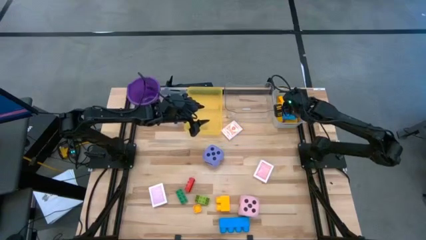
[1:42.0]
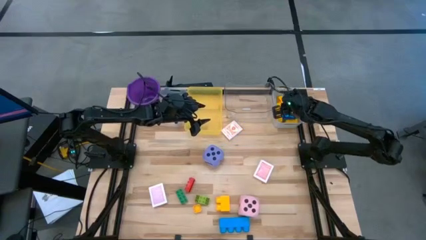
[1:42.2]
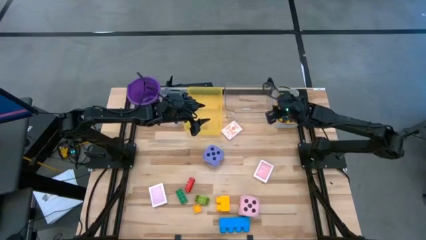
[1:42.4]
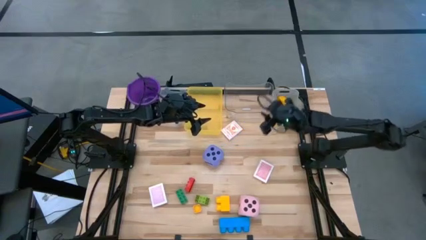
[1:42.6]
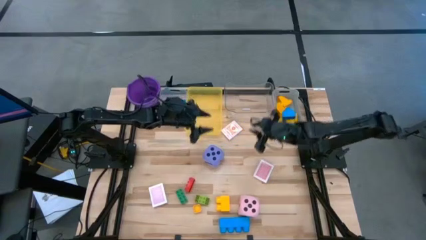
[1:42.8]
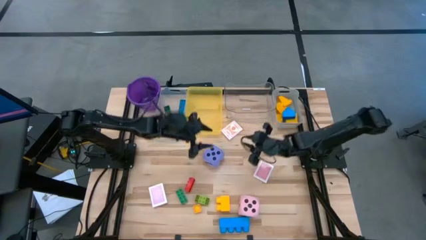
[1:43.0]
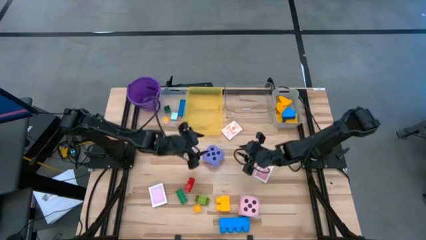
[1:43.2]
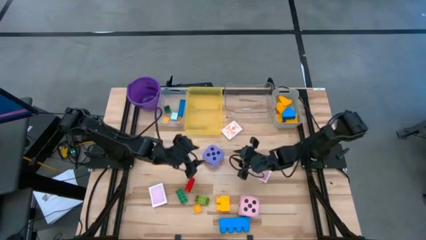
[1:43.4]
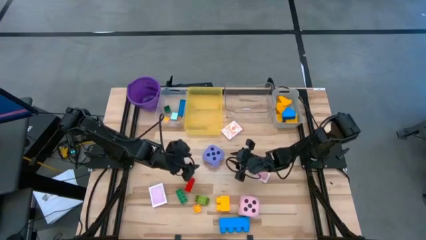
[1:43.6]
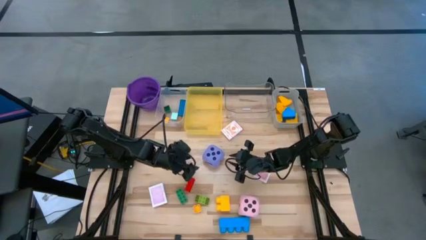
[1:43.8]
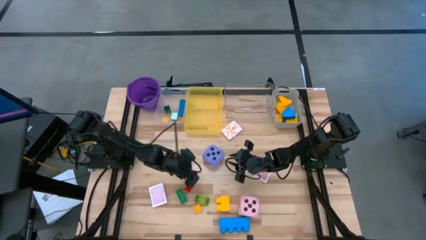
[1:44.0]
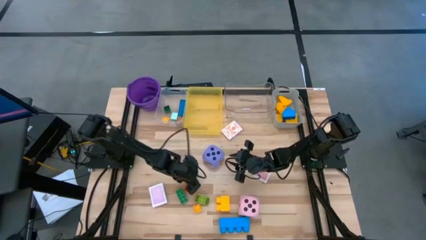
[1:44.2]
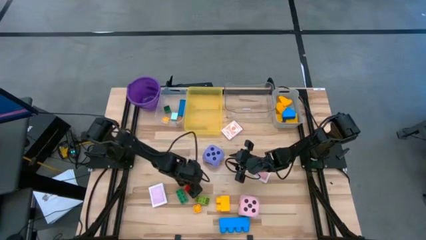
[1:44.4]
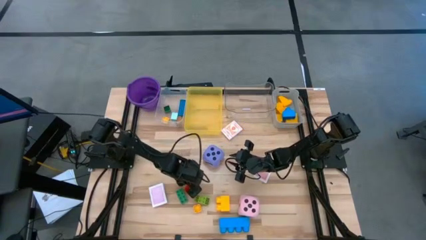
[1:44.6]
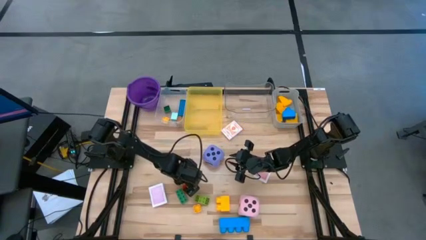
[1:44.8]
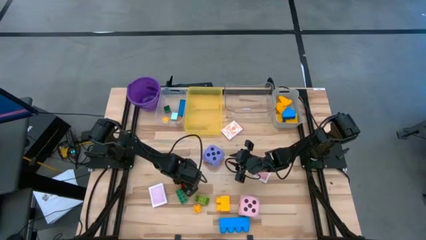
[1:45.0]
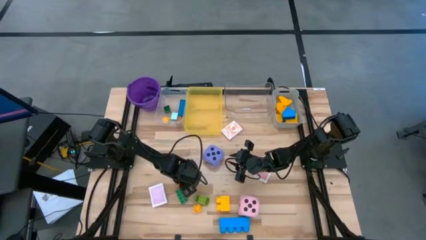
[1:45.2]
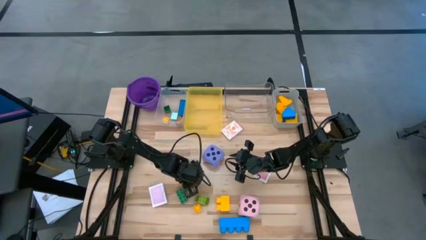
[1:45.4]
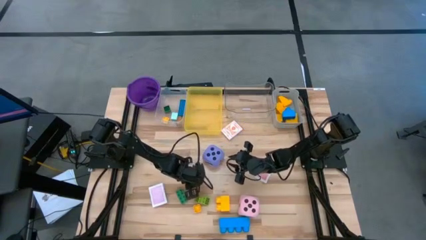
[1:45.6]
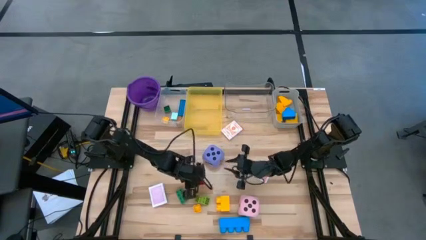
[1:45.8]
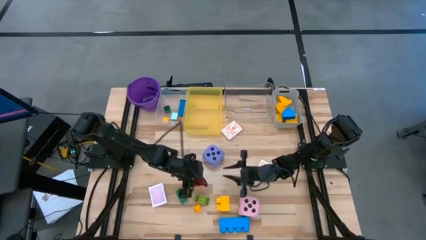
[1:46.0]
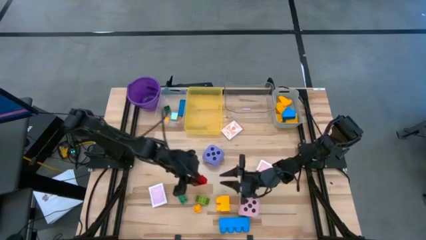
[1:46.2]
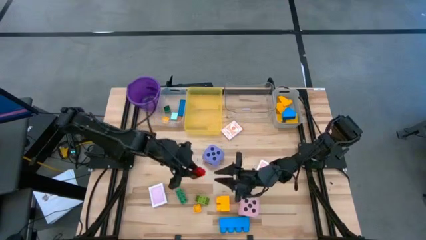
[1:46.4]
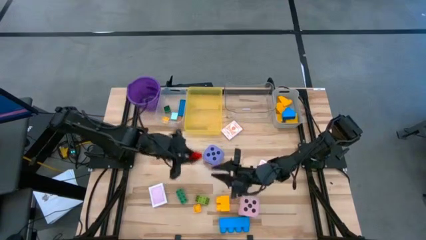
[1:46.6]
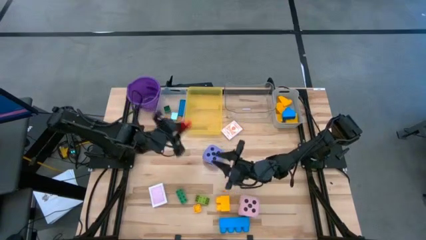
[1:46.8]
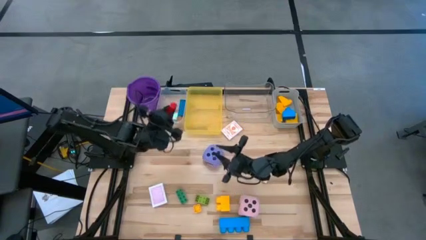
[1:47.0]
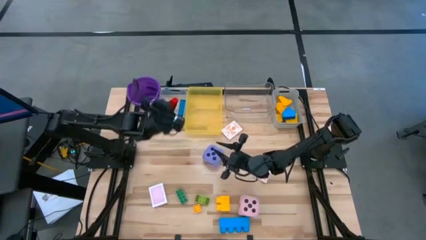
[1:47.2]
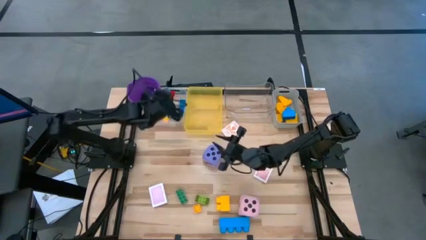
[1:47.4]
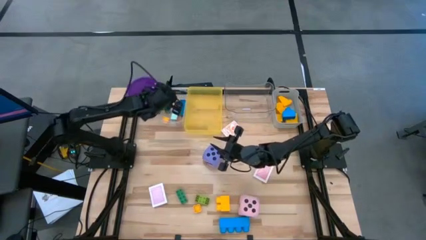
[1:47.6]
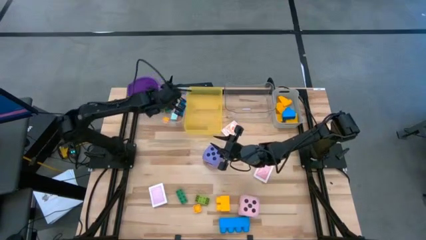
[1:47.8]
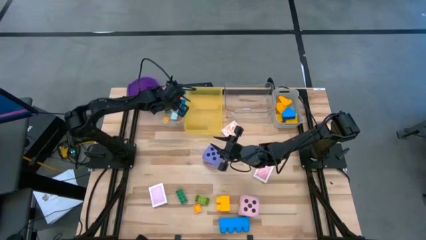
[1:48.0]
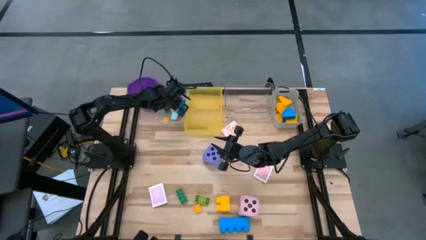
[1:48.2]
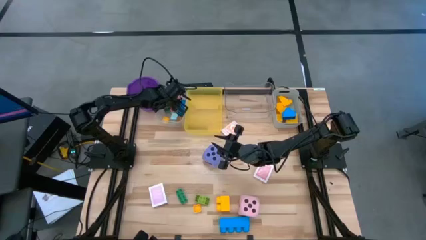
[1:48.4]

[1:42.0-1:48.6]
Task: Pick & Place Toys
Put the small red game piece into the white bin

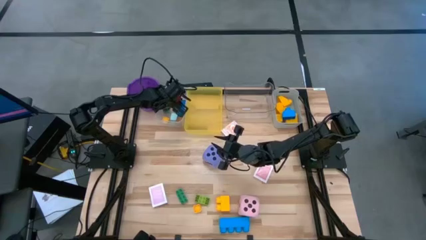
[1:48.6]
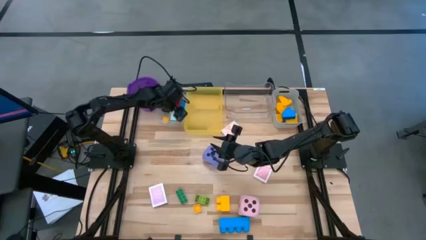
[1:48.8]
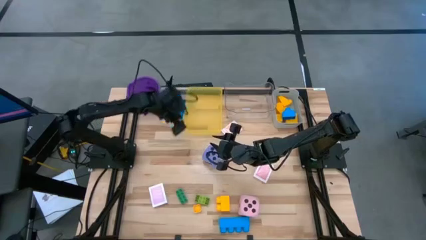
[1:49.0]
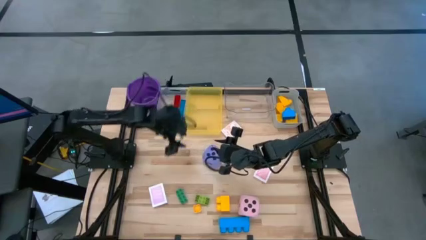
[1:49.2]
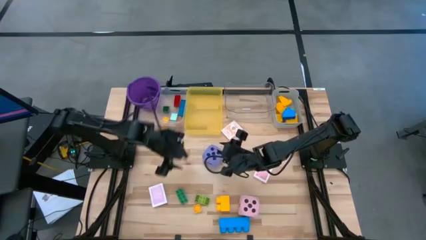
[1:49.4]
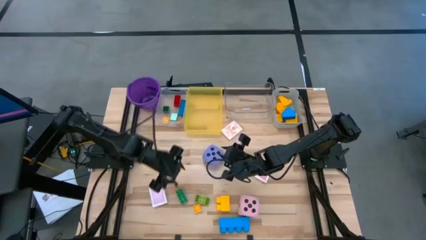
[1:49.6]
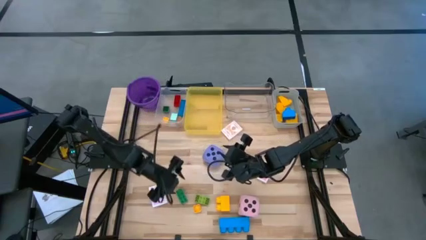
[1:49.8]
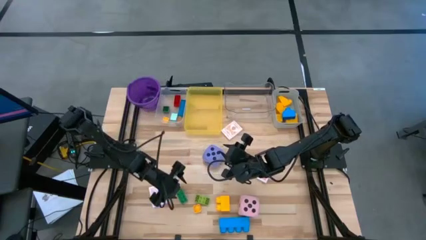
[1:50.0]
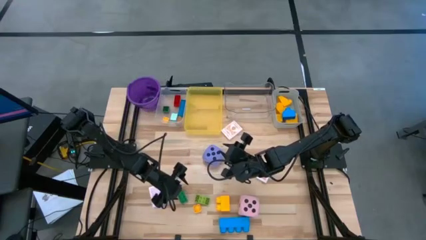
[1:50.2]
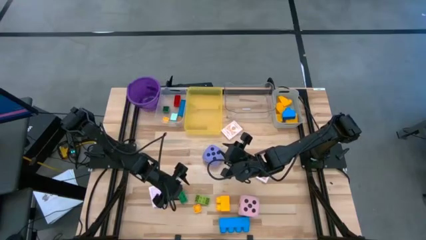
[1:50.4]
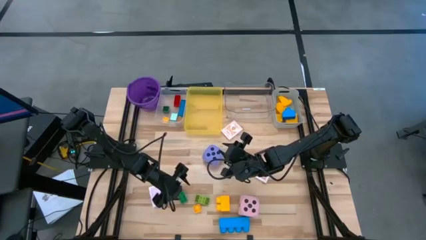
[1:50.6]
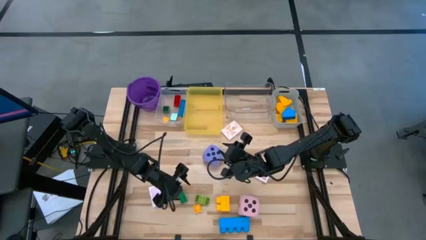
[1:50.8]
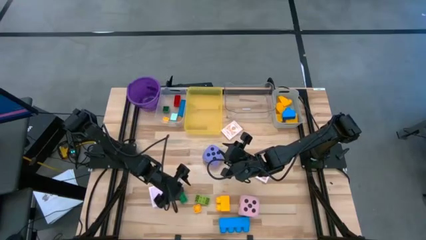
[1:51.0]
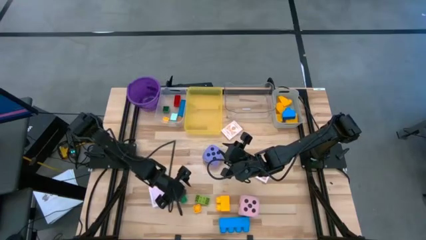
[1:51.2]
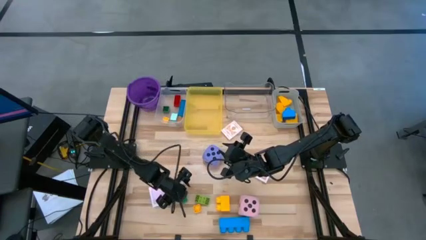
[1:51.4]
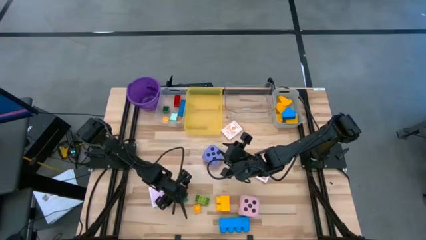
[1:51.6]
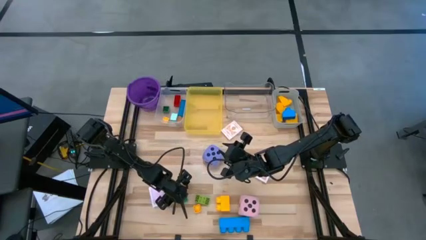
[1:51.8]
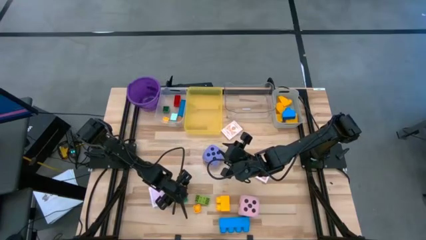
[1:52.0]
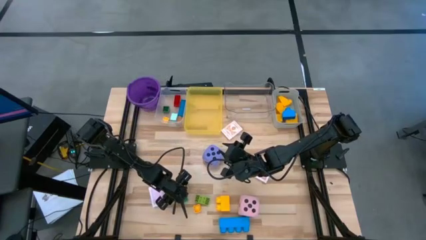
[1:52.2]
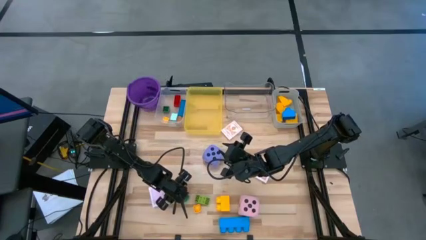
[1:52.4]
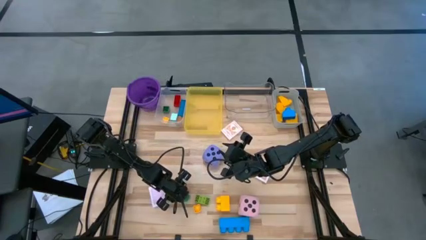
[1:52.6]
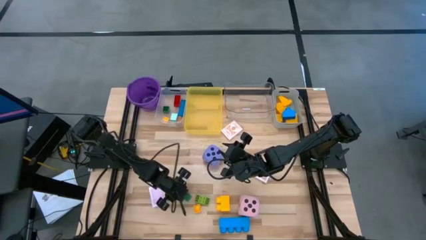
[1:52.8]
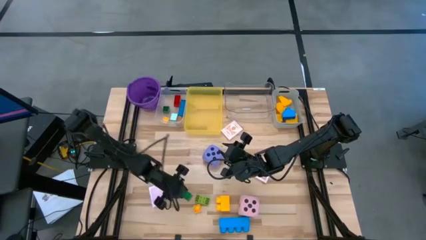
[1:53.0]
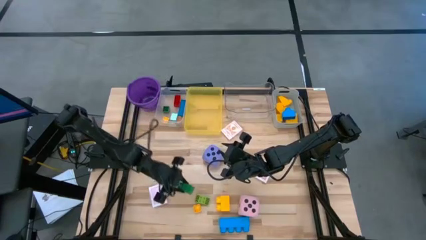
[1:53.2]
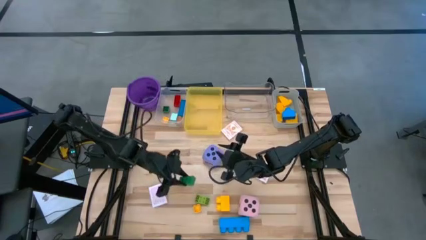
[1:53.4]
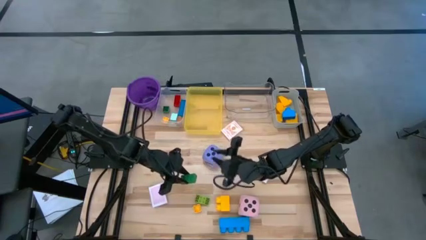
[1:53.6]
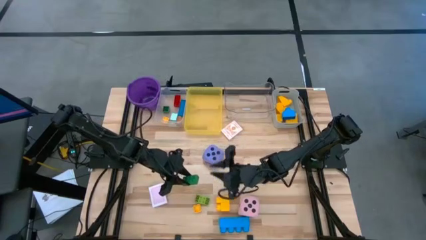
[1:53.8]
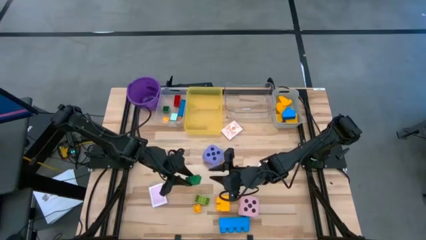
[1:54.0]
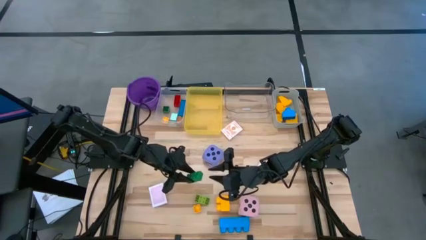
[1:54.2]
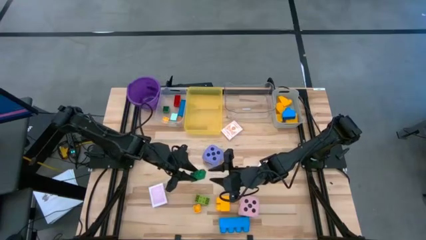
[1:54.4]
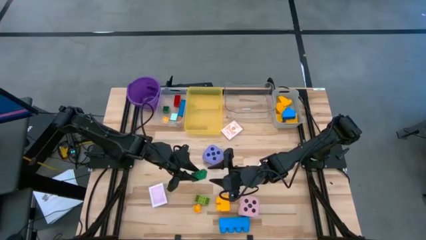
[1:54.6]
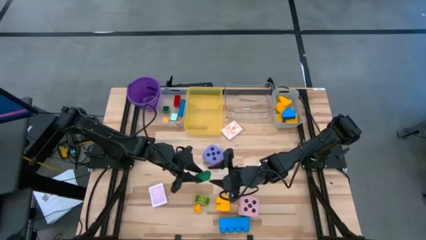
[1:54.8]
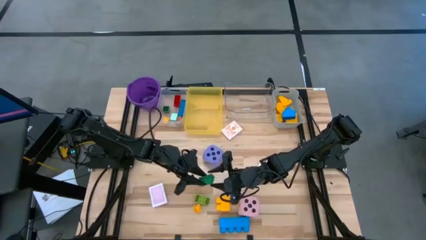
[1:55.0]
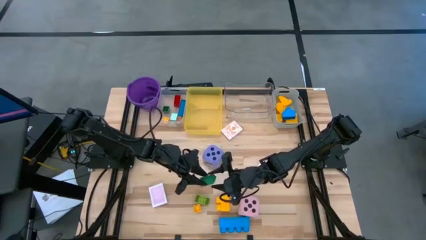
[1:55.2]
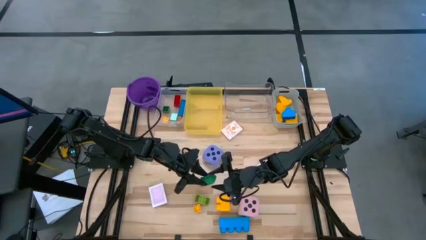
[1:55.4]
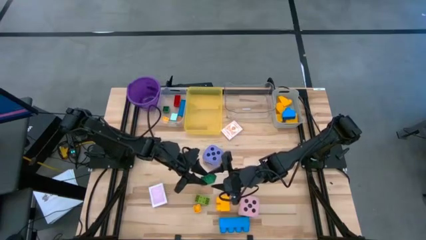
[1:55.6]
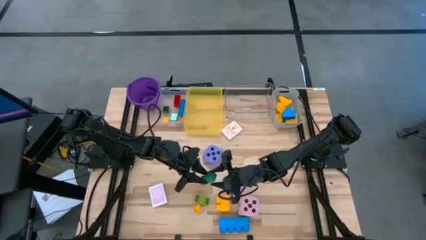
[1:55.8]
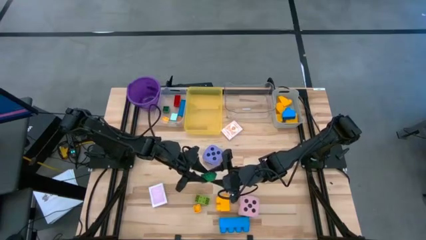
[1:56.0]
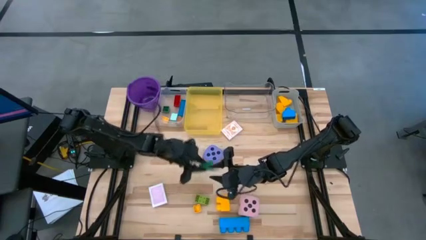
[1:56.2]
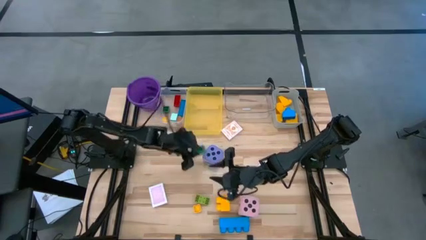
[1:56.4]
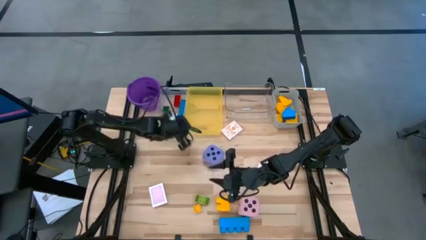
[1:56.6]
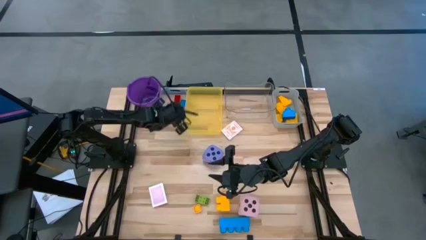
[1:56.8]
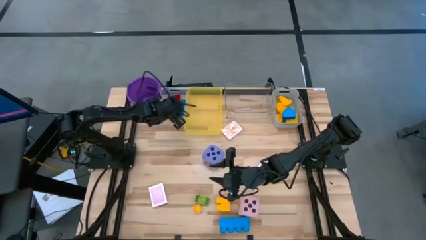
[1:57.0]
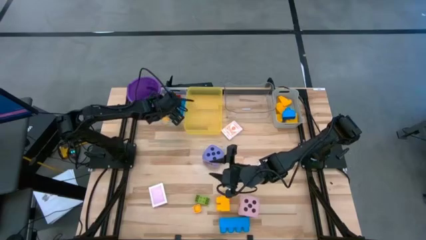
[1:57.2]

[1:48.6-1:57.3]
Put the small green game piece into the white bin

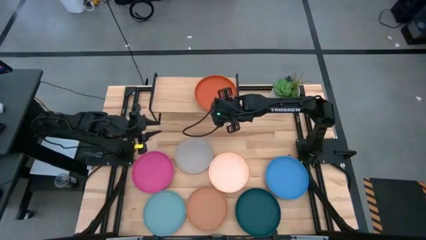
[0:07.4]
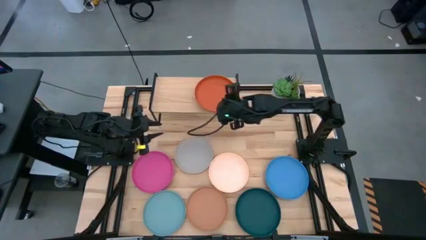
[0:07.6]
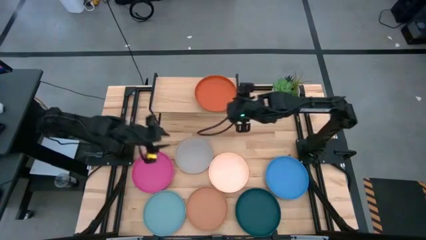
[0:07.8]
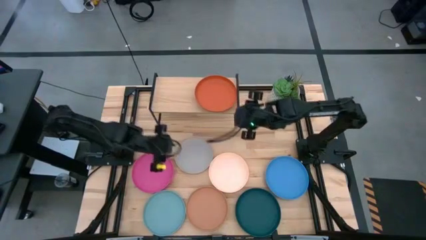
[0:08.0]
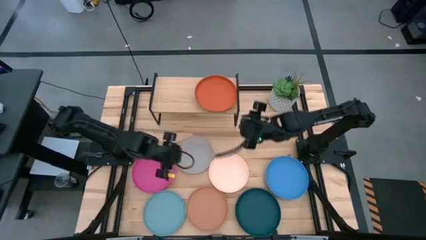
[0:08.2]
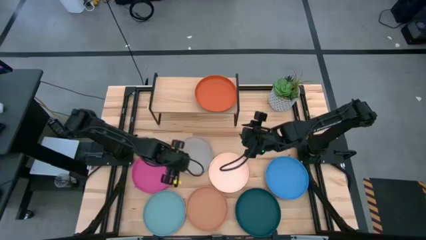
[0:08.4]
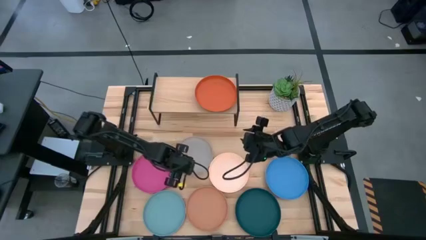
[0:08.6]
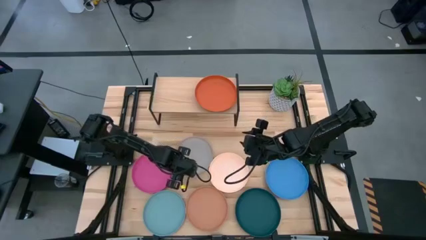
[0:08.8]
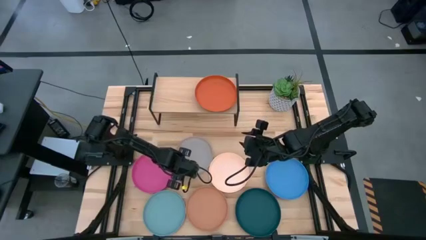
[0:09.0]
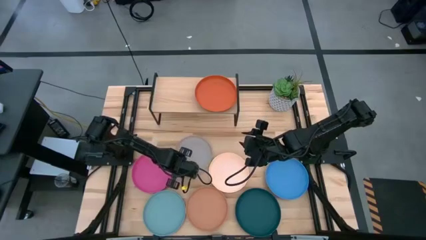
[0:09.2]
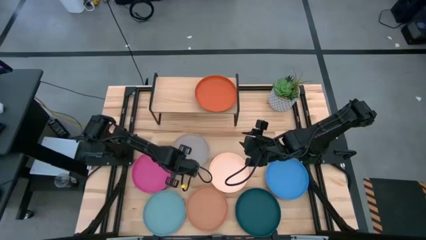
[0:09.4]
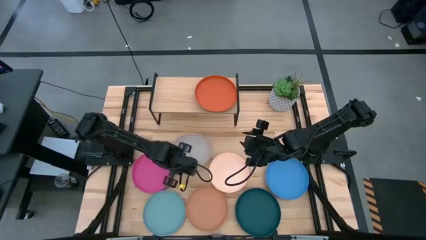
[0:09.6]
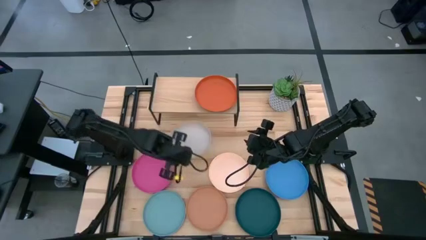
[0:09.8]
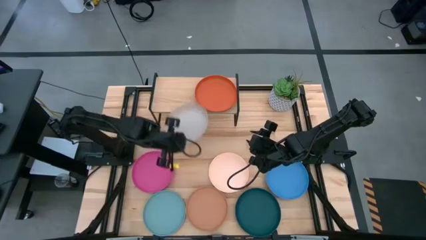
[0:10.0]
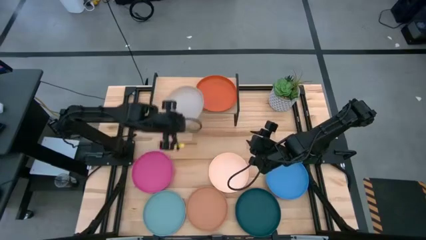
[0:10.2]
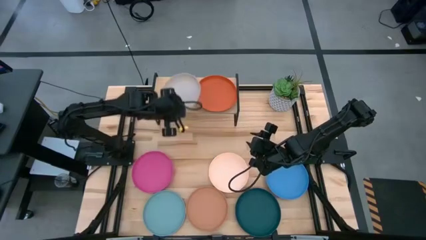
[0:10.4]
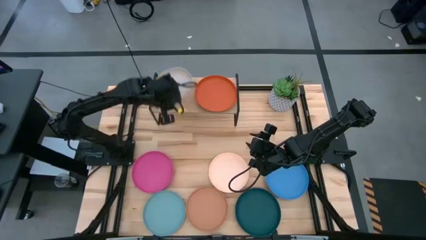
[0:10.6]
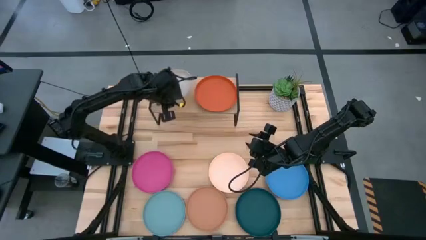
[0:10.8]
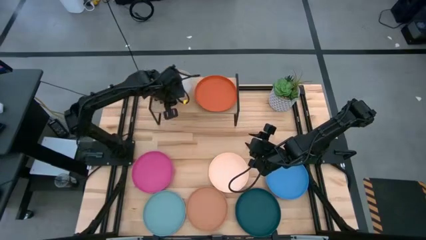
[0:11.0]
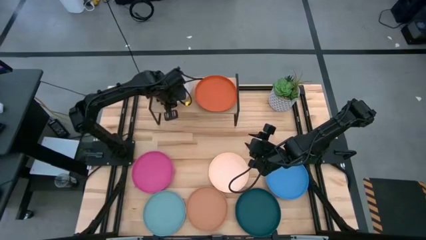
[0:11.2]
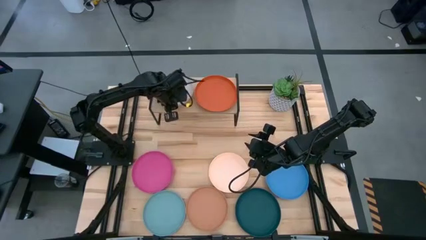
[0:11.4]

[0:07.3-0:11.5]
Task: Place and stack plates onto a shelf
Put the gray plate on the shelf
